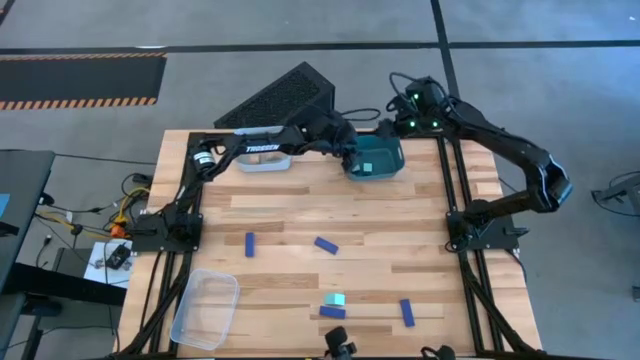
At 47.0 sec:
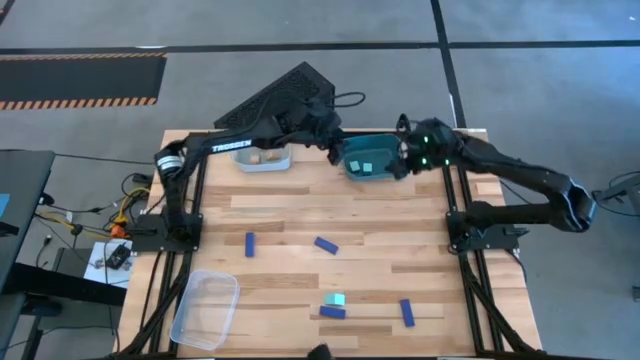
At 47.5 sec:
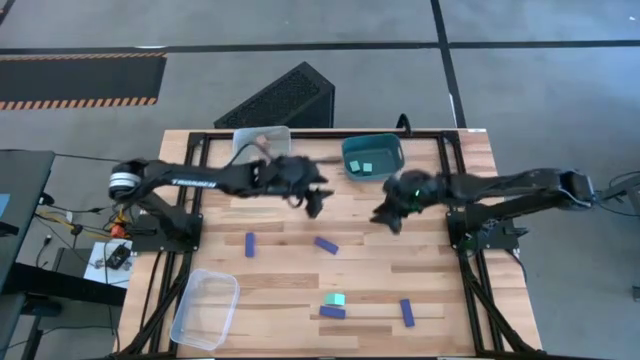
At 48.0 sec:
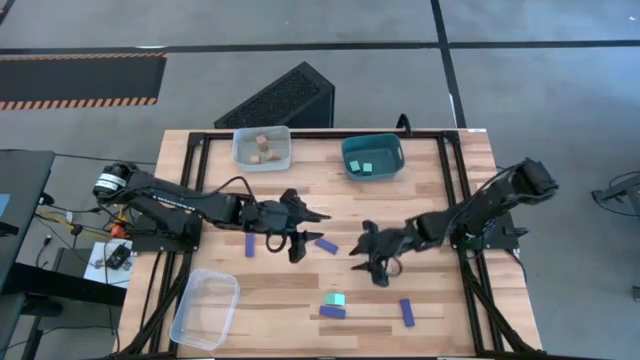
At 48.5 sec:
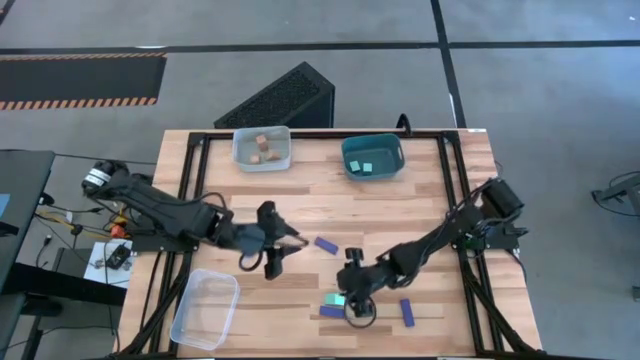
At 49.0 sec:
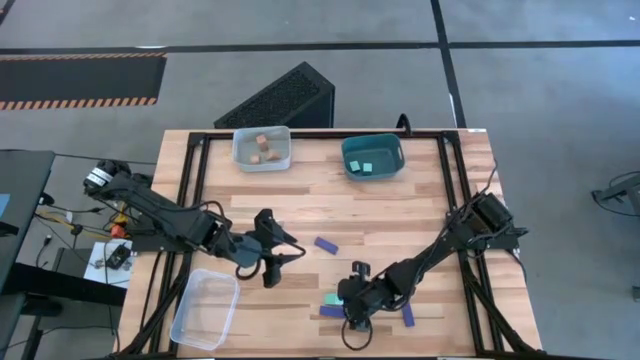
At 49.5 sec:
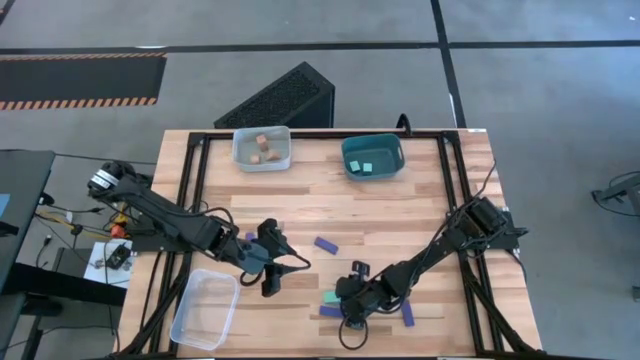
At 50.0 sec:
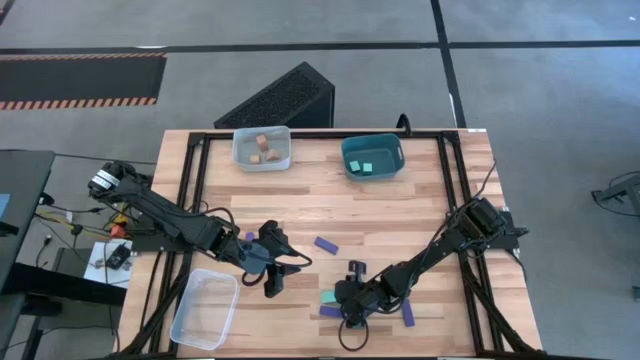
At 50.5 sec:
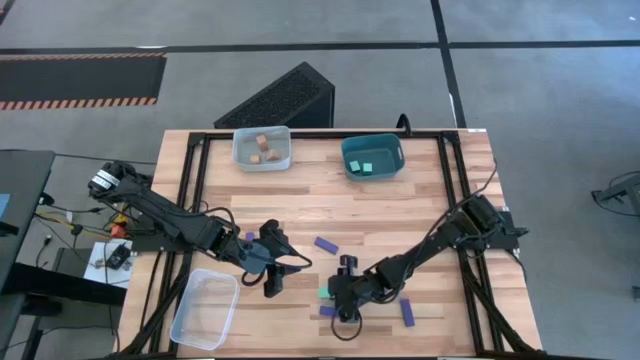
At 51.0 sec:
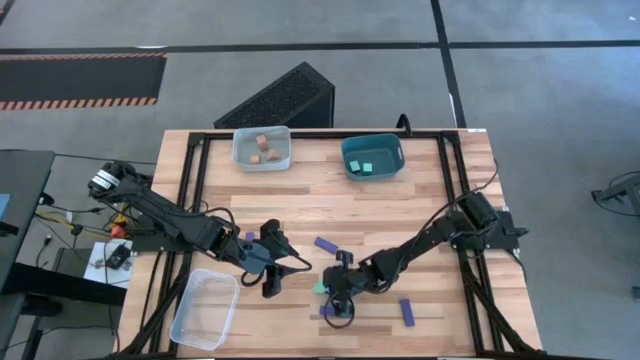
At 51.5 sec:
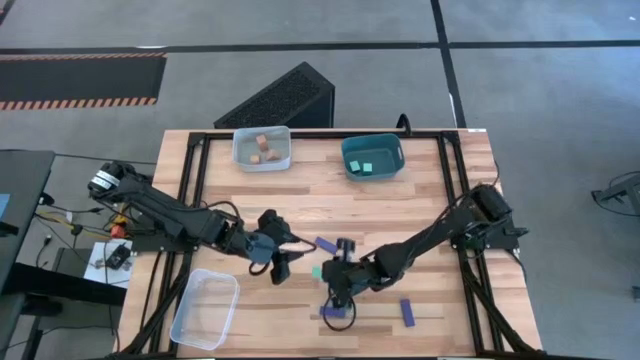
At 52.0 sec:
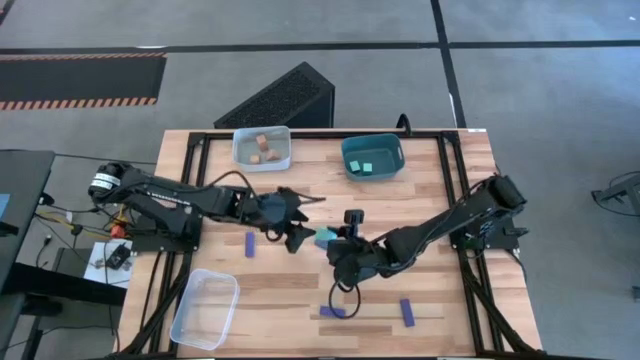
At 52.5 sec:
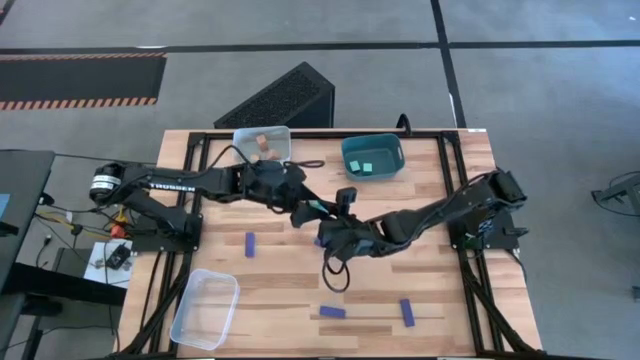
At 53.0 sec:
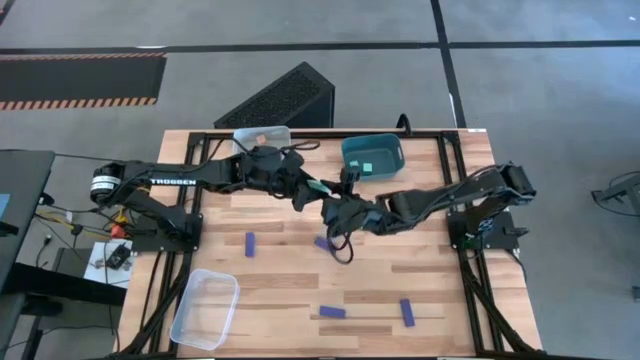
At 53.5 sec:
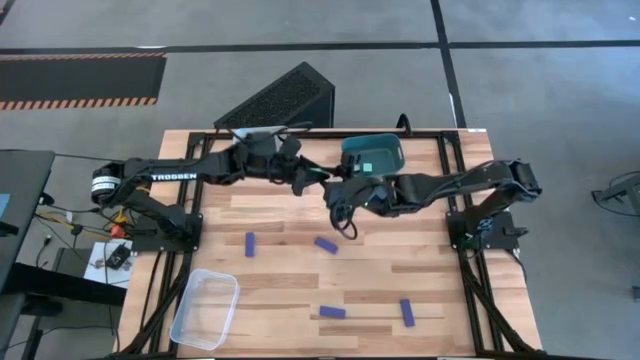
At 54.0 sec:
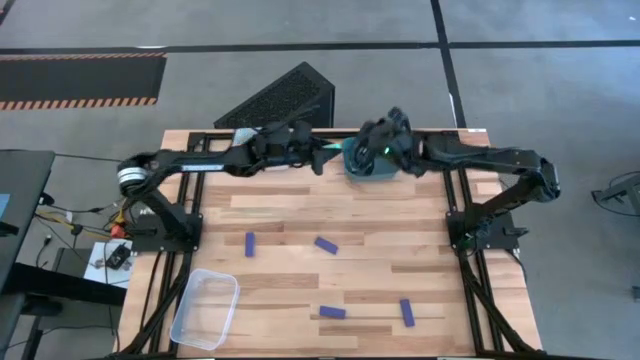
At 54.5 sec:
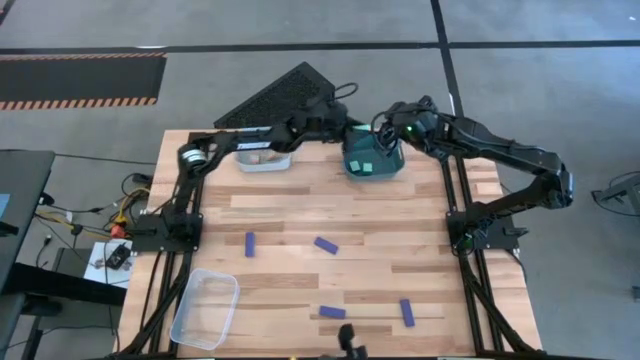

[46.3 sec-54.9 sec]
Task: Sort & place blocks by color
Put the blue block into the blue bin

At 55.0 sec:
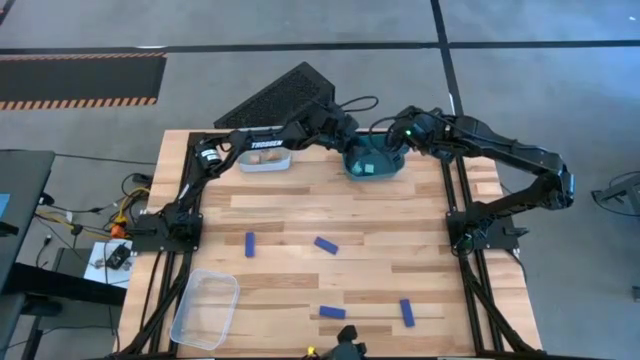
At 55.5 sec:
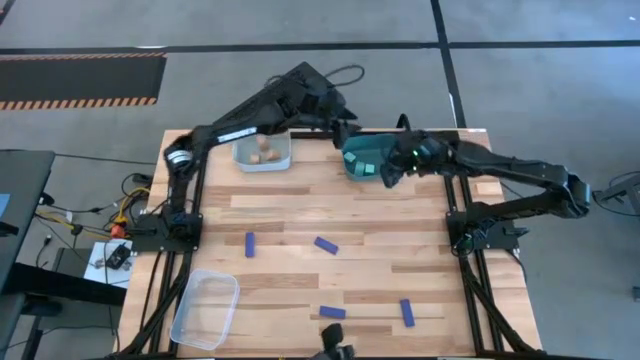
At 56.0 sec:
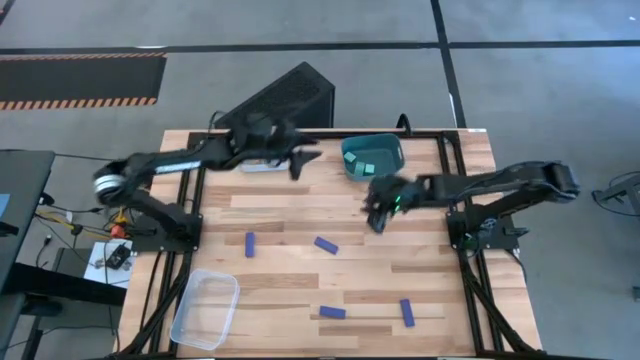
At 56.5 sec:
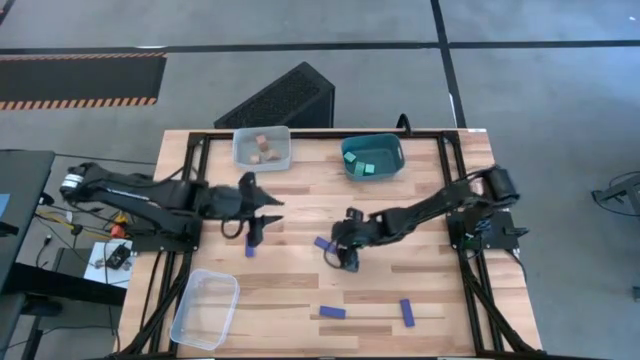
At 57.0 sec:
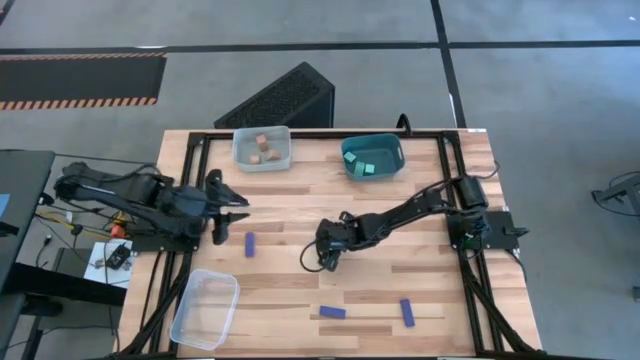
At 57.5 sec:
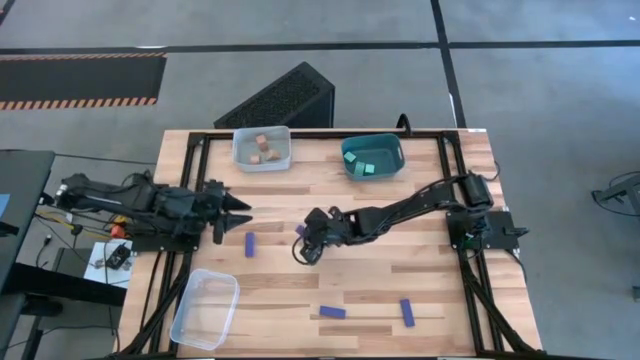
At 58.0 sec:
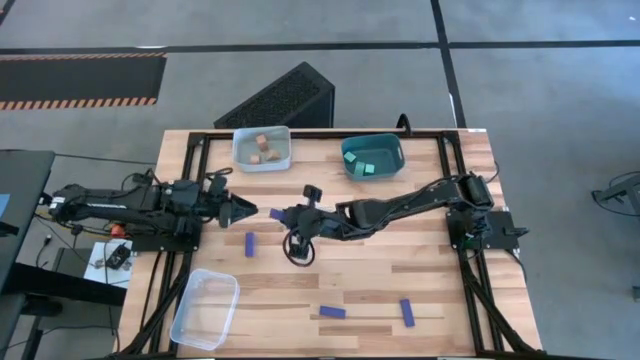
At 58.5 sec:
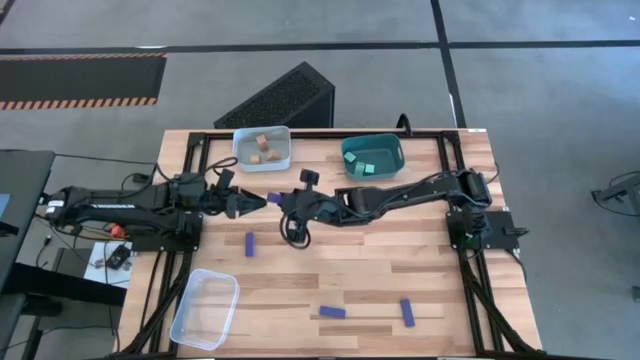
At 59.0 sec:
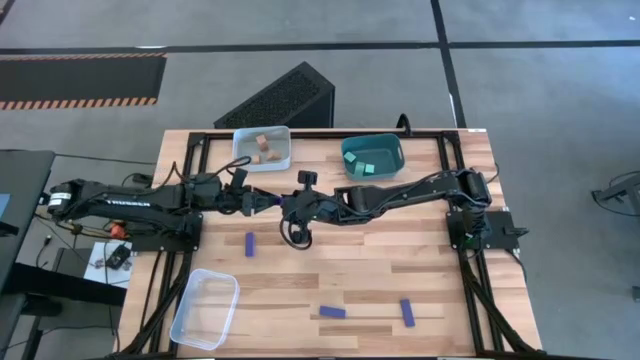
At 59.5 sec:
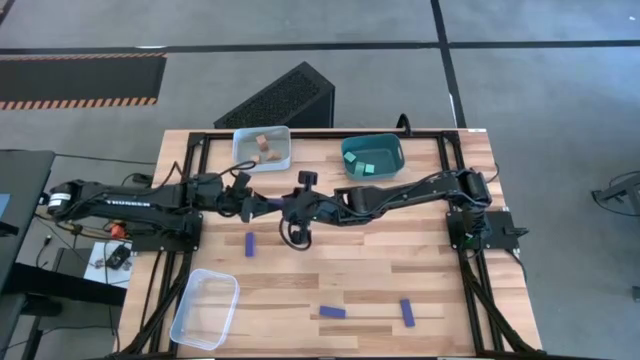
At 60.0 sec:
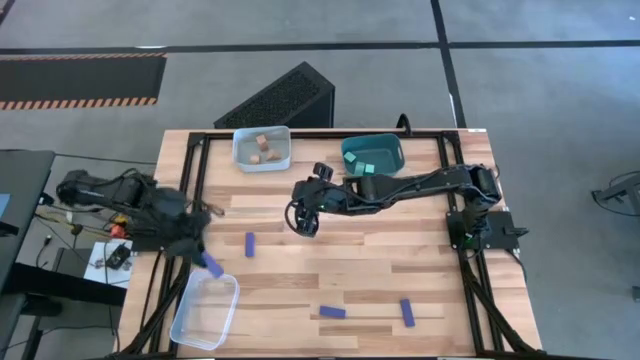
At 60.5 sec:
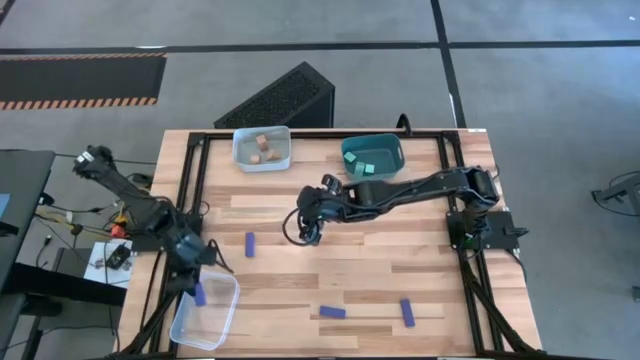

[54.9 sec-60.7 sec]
Put the top left violet block into the transparent bin

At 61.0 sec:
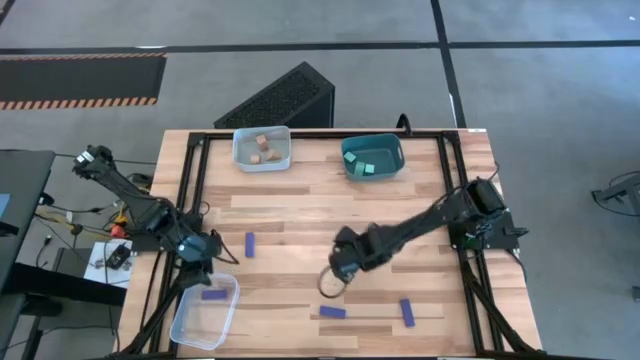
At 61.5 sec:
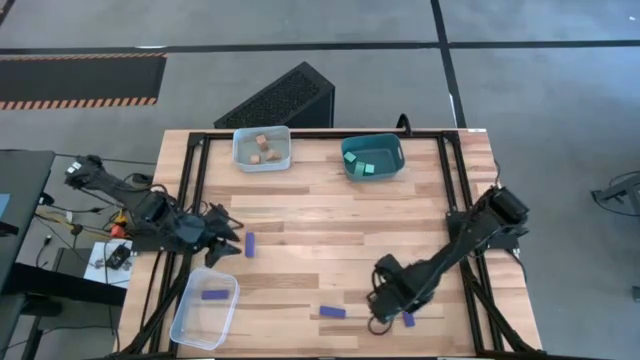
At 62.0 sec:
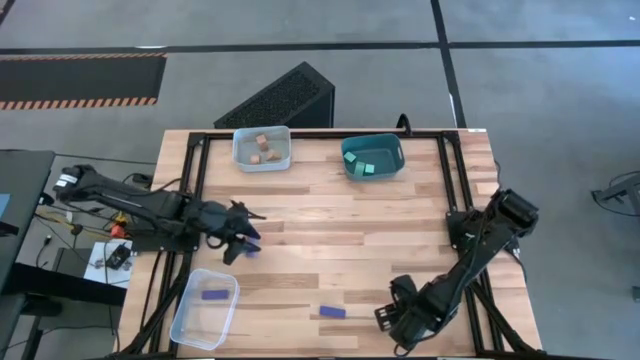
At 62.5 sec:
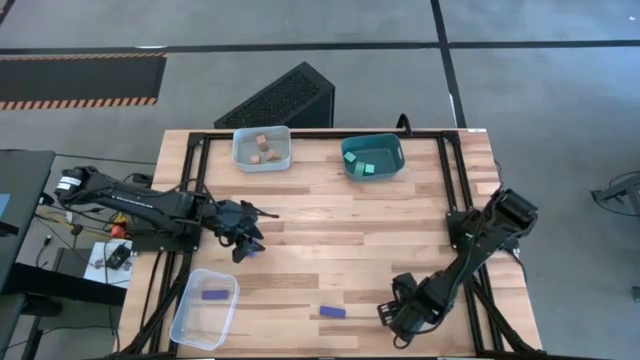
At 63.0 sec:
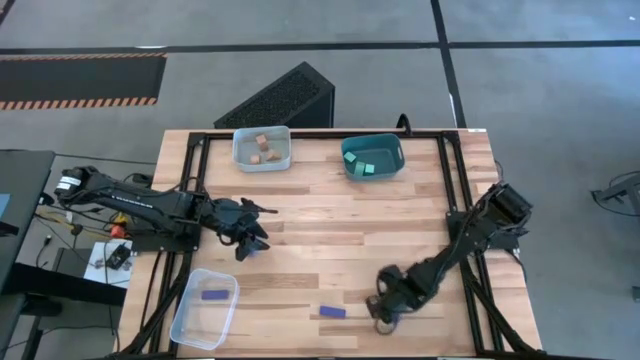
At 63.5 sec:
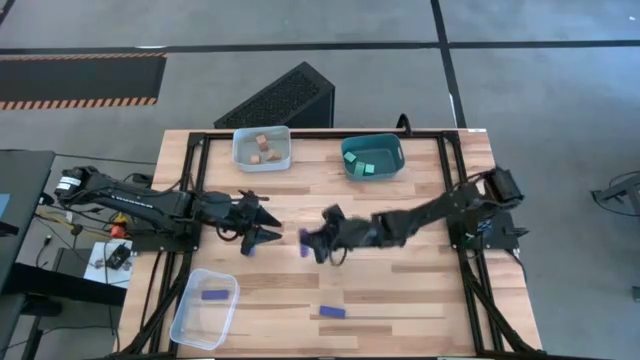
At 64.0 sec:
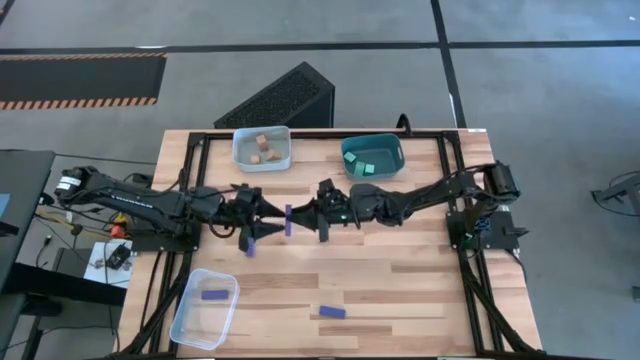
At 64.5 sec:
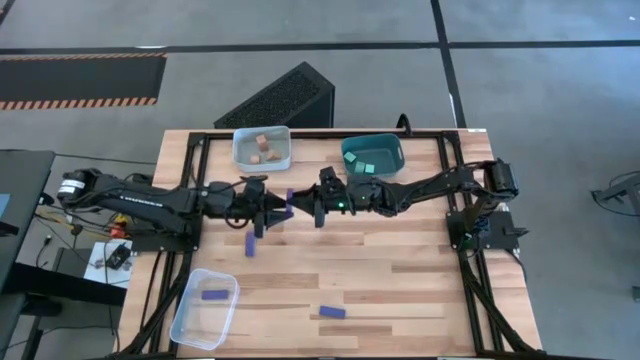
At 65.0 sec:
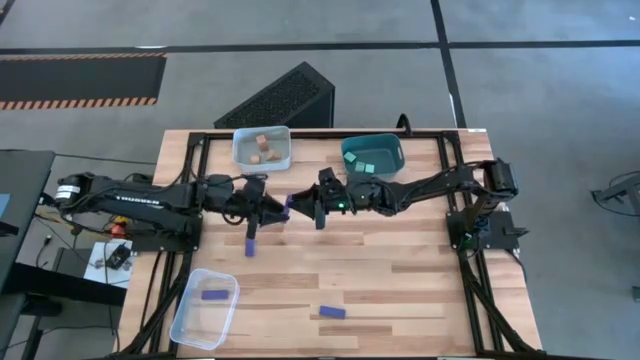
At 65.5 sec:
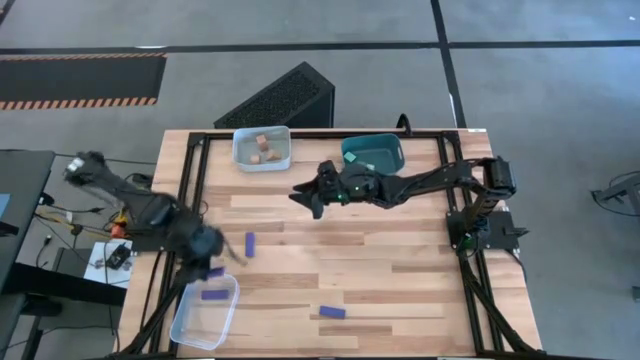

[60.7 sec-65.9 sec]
Put the bottom right violet block into the transparent bin

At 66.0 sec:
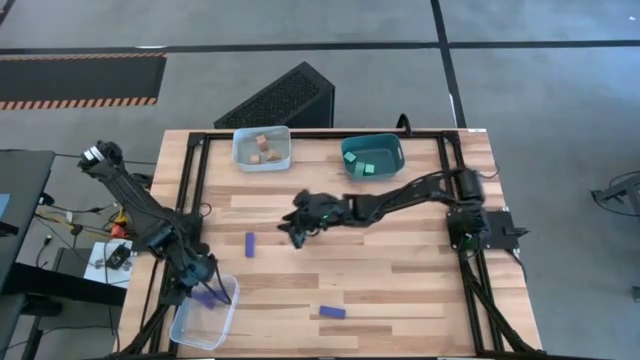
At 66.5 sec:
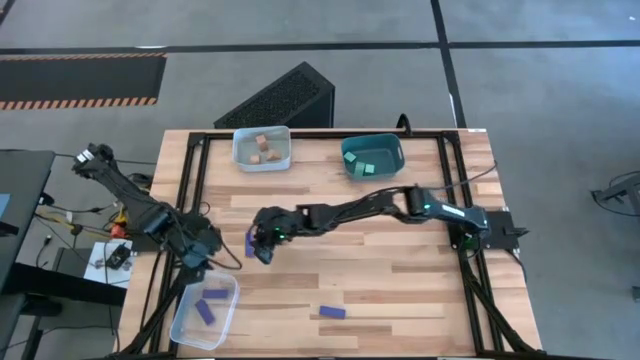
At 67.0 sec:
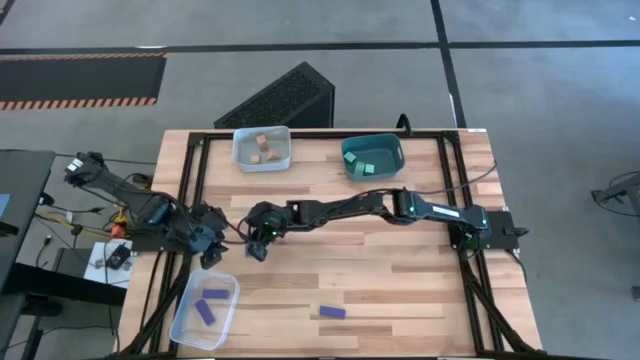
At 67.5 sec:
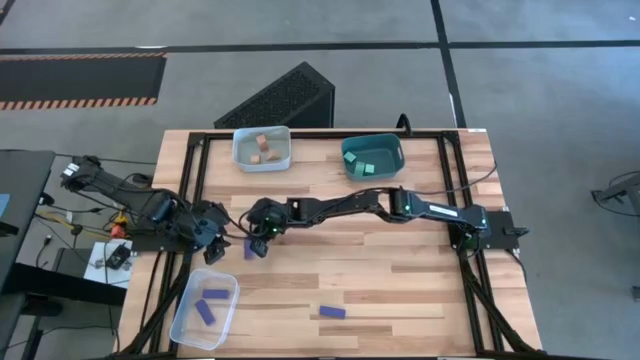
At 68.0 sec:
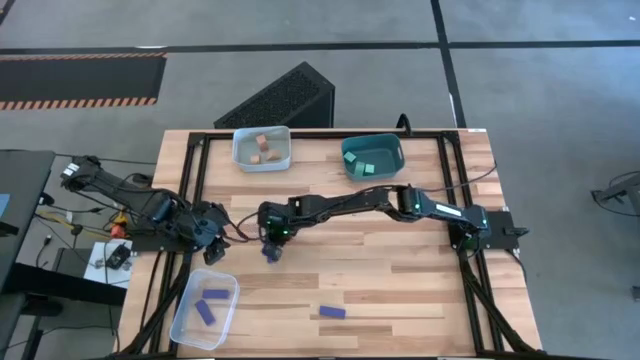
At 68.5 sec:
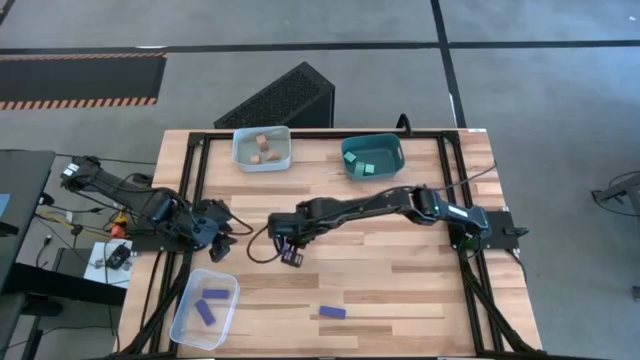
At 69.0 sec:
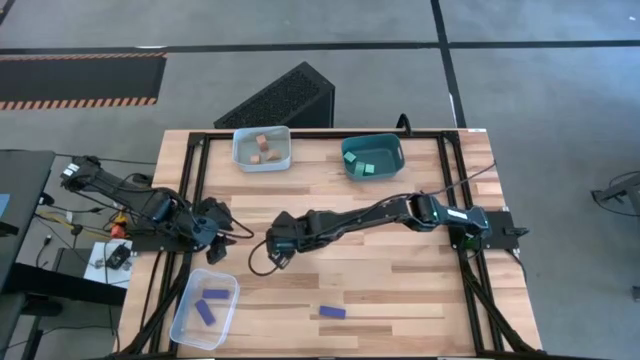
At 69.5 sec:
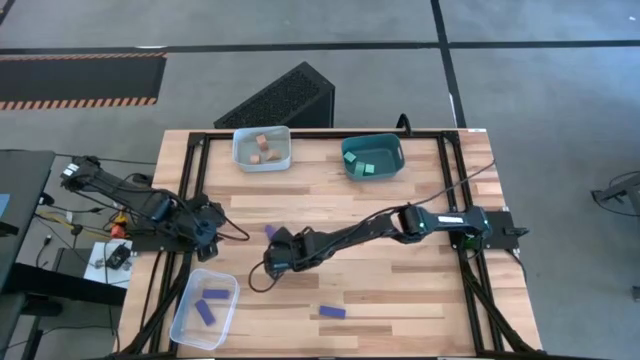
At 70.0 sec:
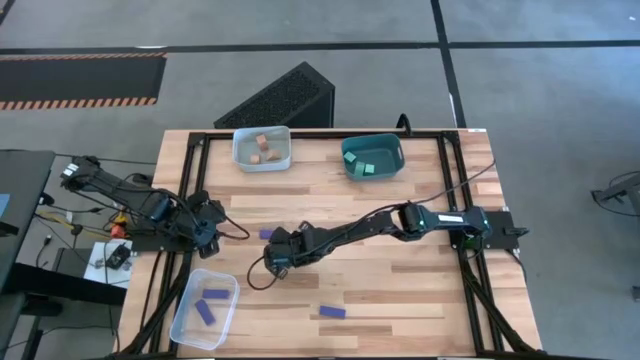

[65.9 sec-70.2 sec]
Put the top violet block into the transparent bin
